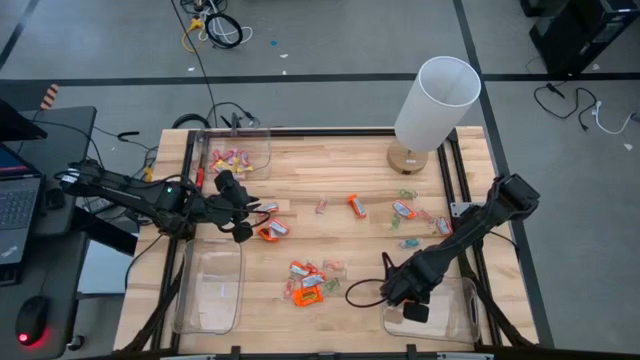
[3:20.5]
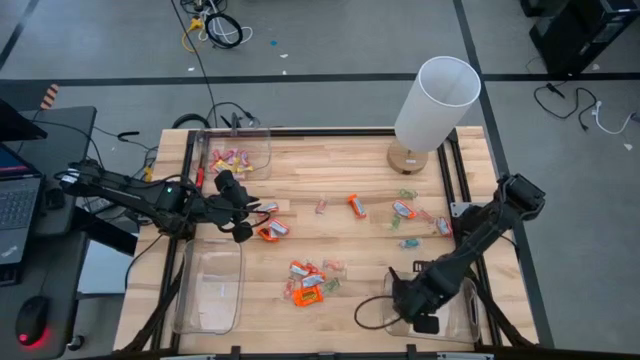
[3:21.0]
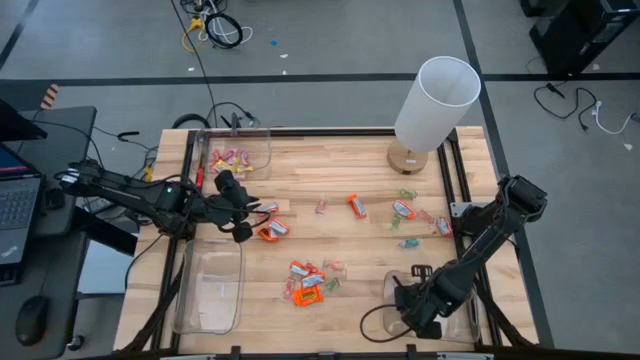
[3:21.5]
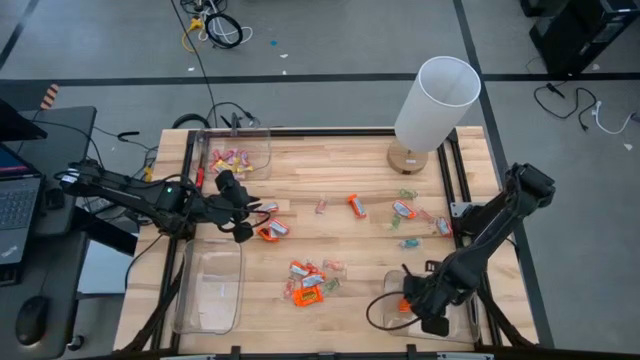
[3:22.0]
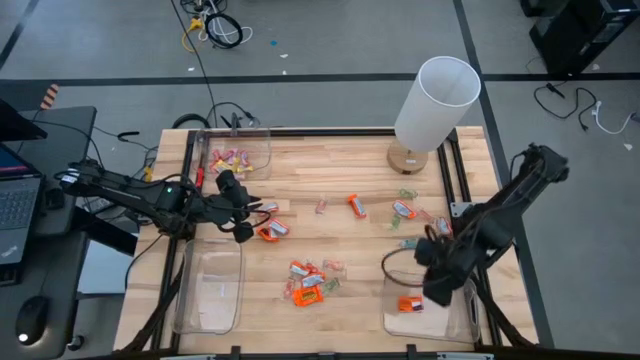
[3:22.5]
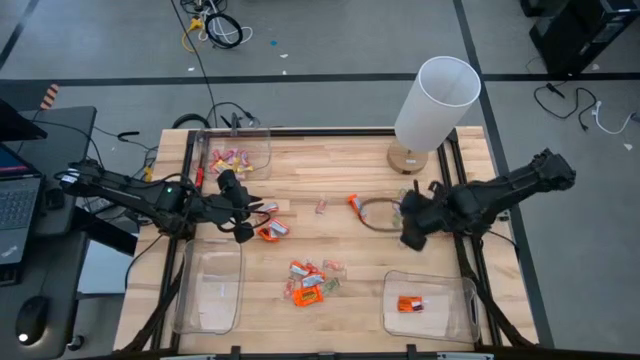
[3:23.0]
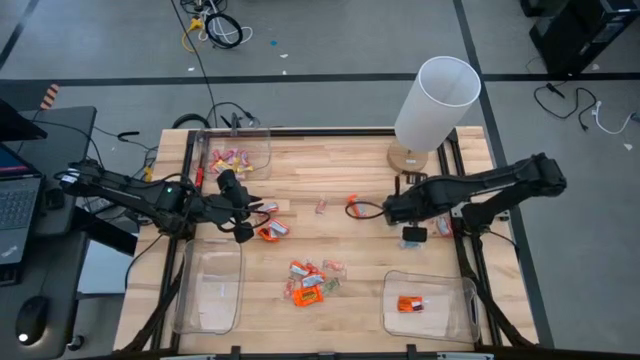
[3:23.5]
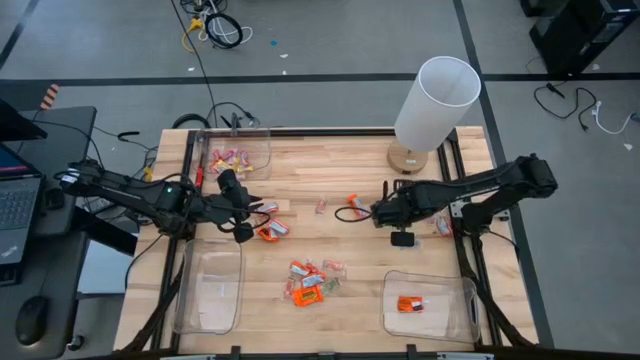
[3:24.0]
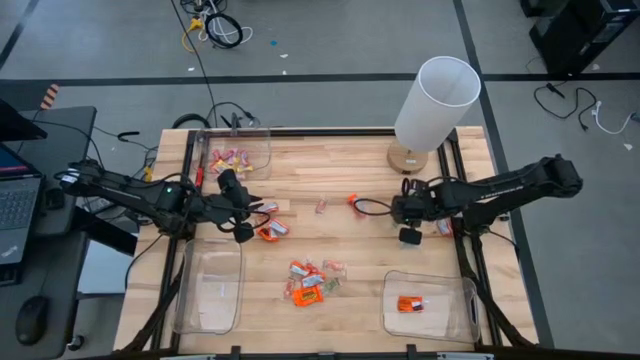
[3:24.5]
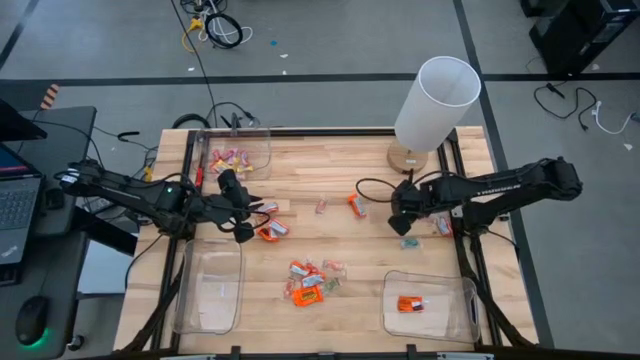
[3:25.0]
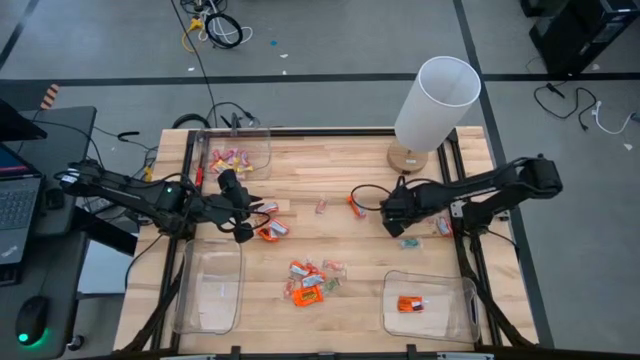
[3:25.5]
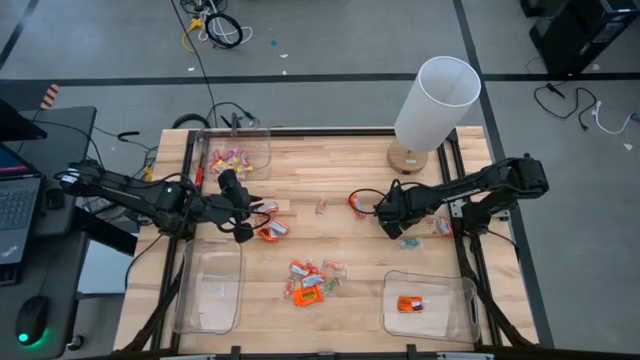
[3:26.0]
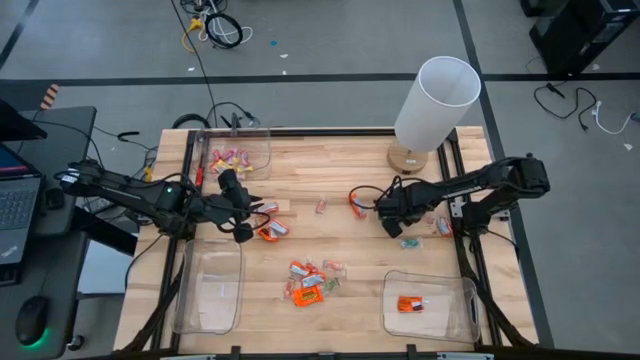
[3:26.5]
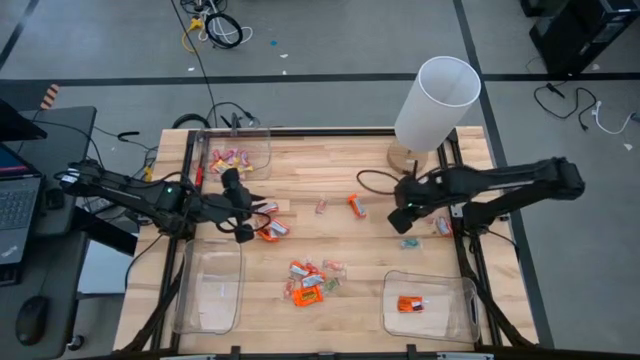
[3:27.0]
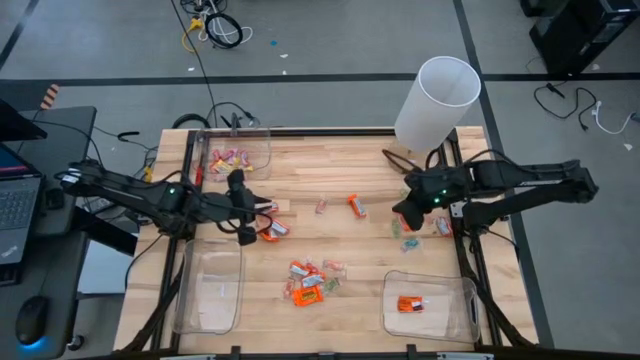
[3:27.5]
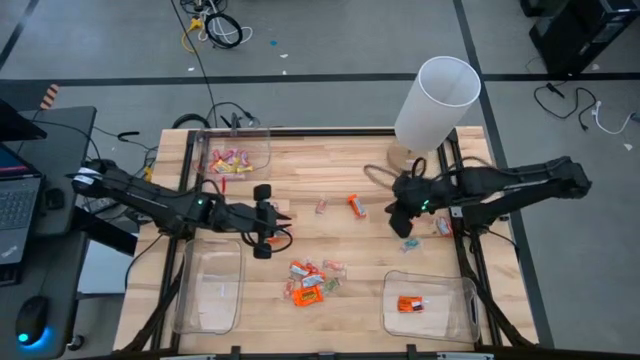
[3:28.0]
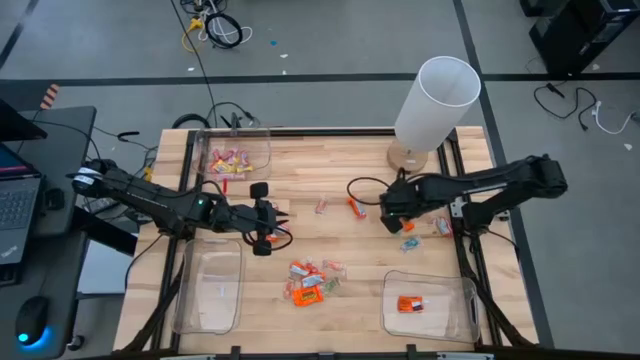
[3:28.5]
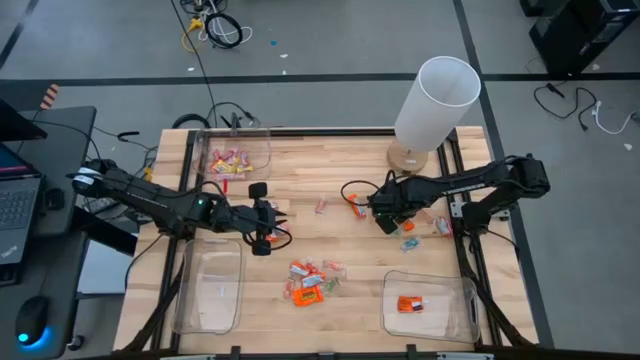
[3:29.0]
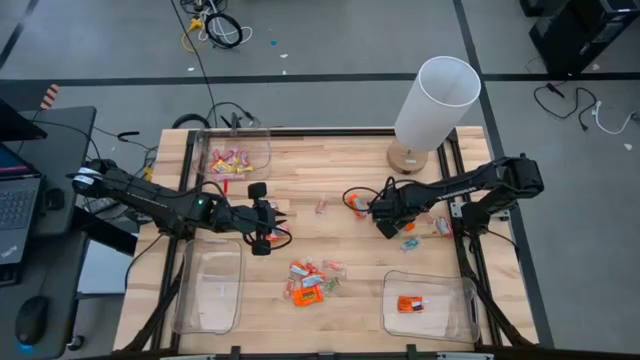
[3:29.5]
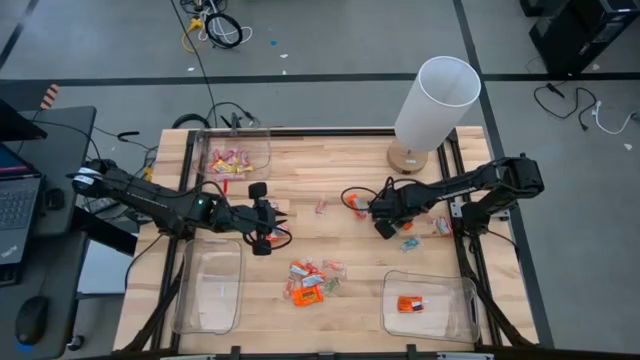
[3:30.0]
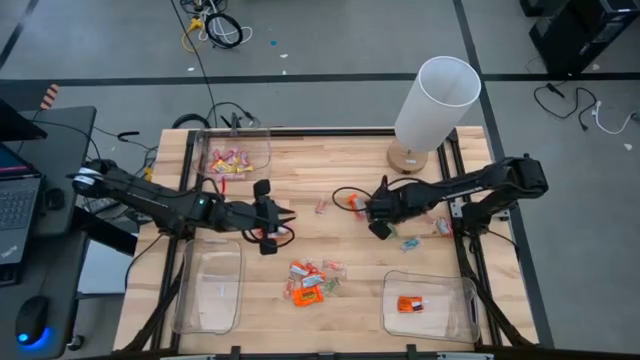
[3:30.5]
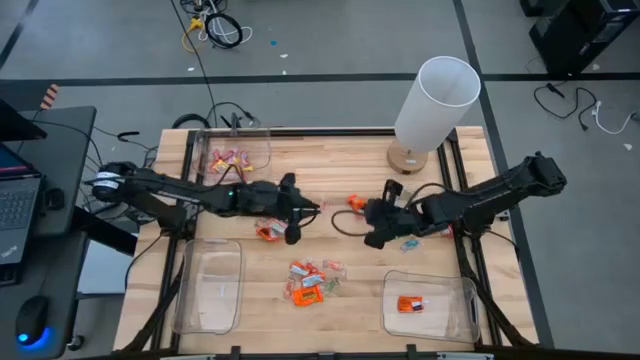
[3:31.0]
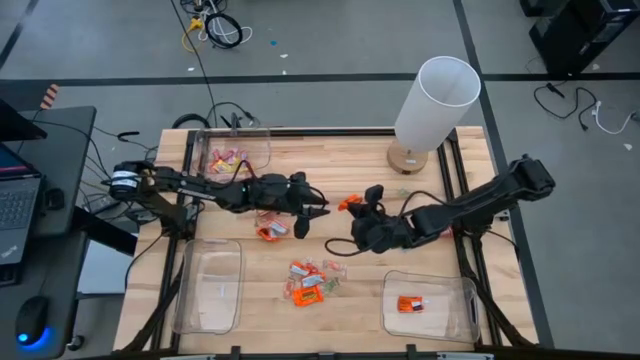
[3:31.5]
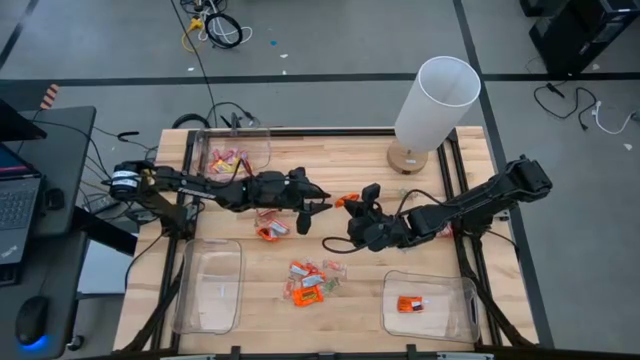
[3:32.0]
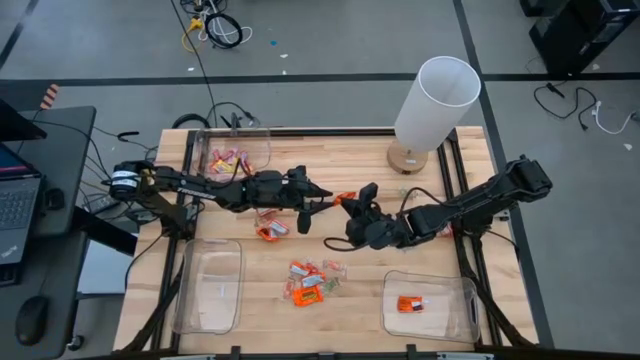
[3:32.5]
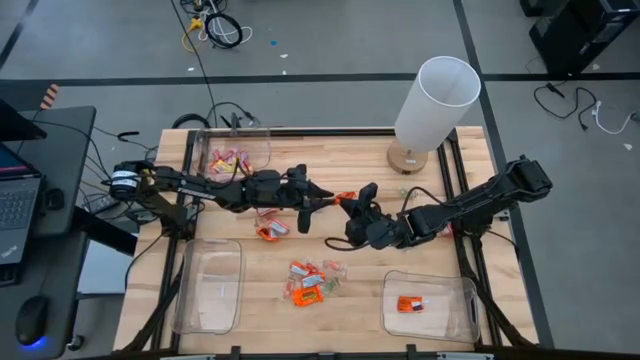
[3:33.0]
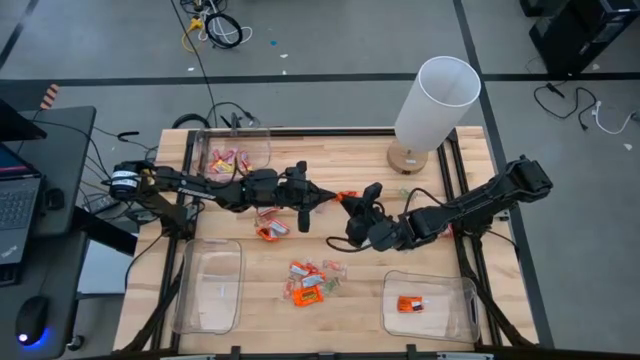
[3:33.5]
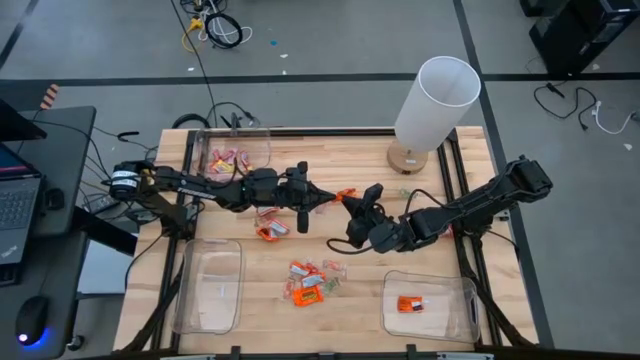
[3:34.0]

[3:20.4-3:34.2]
Task: Sort candy
Put the chocolate into the bottom right transparent bin

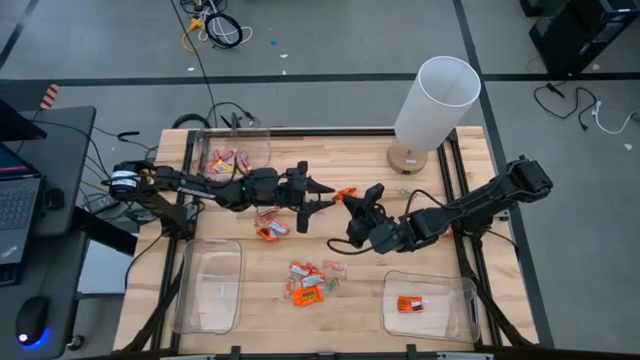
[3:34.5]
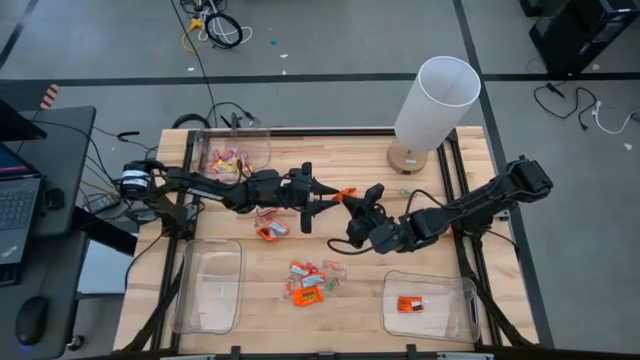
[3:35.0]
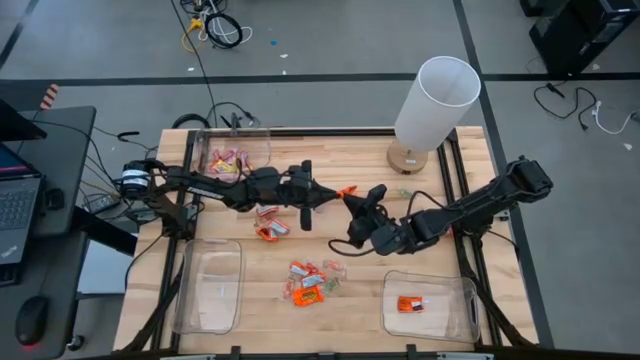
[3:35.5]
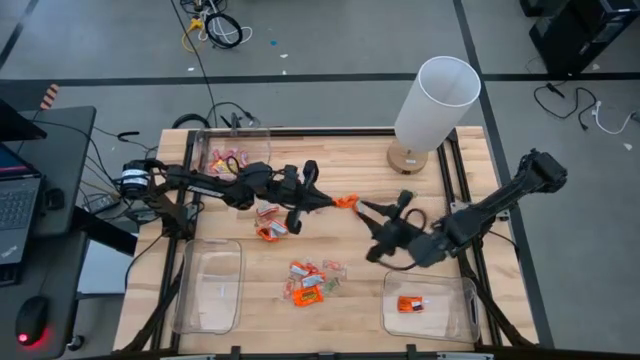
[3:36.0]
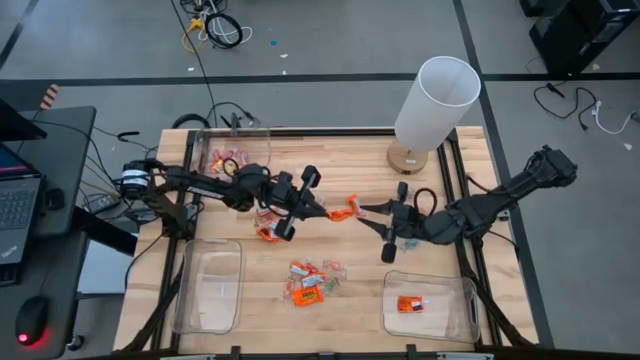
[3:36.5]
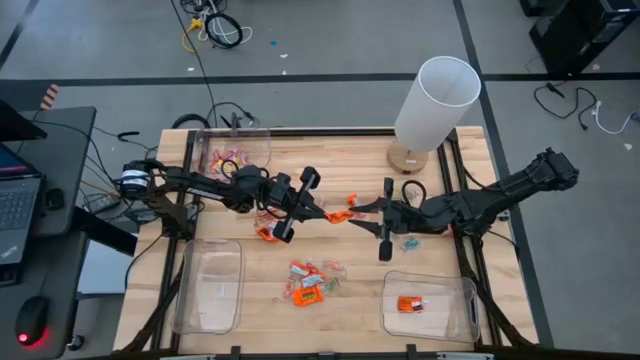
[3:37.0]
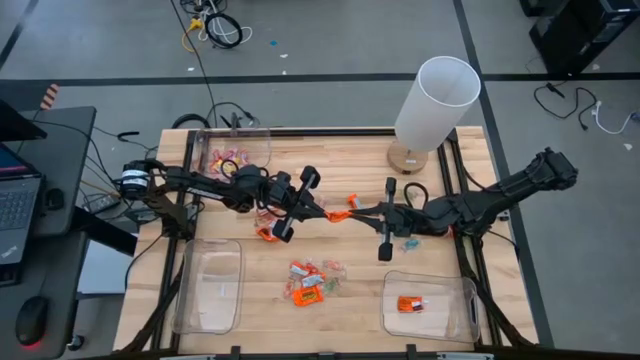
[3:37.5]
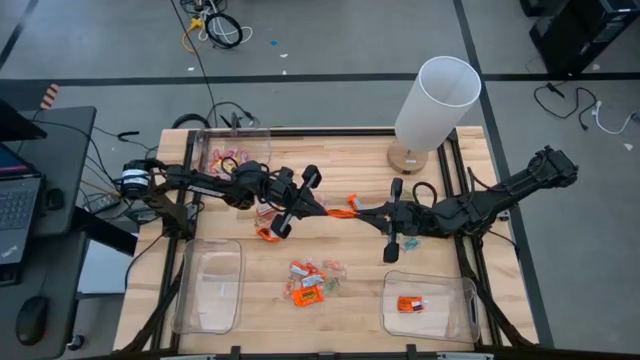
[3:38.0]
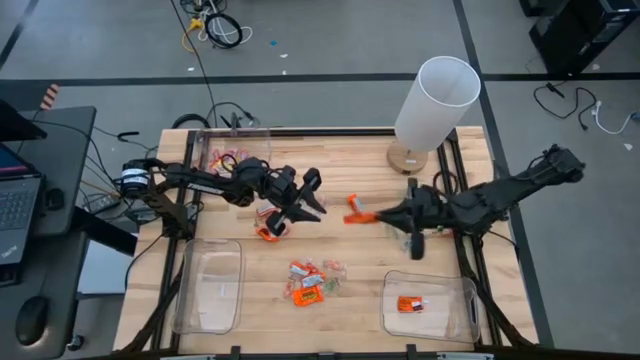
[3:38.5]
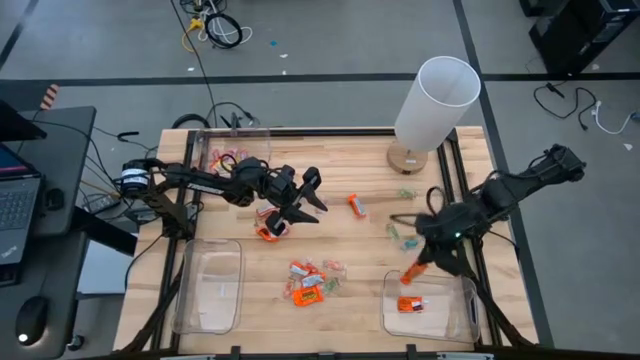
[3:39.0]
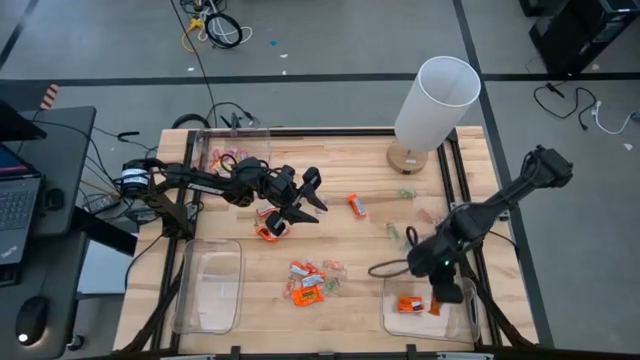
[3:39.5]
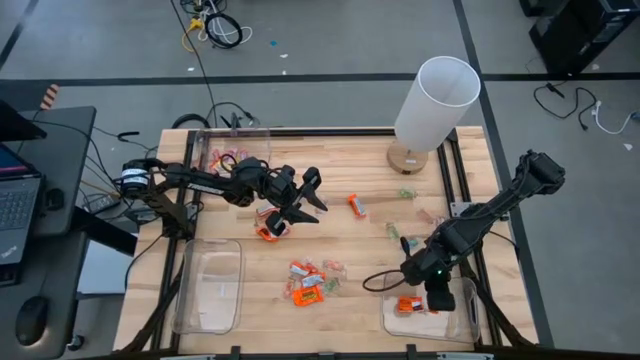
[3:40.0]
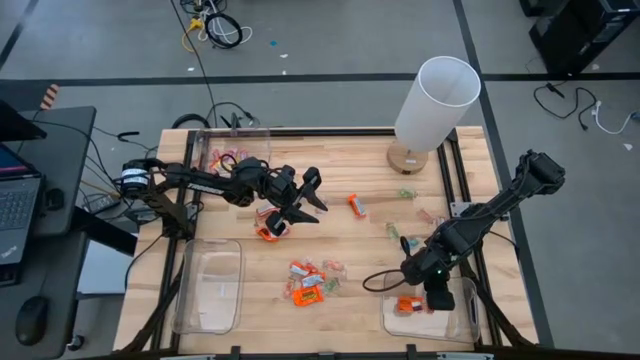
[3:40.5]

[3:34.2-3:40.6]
Put the chocolate into the bottom right transparent bin

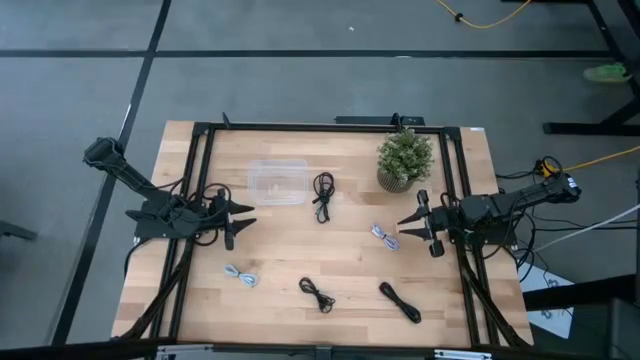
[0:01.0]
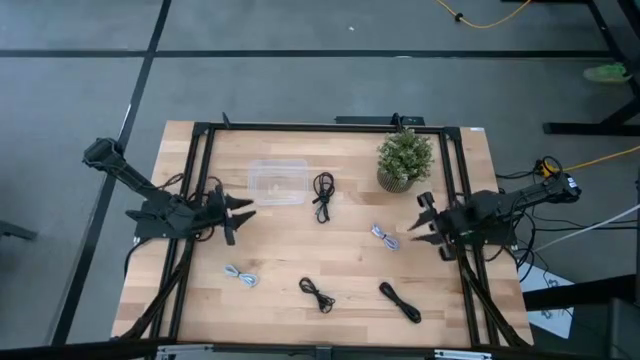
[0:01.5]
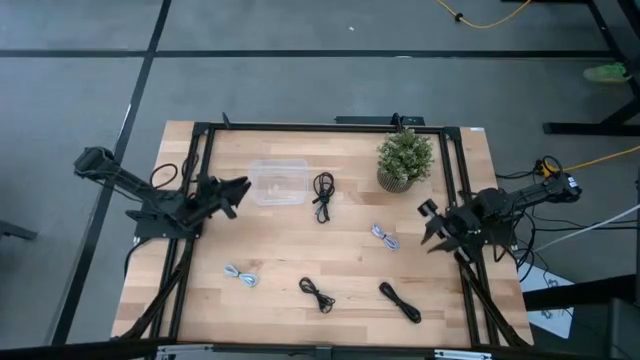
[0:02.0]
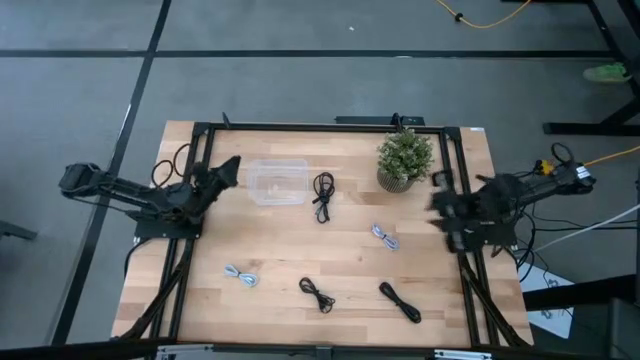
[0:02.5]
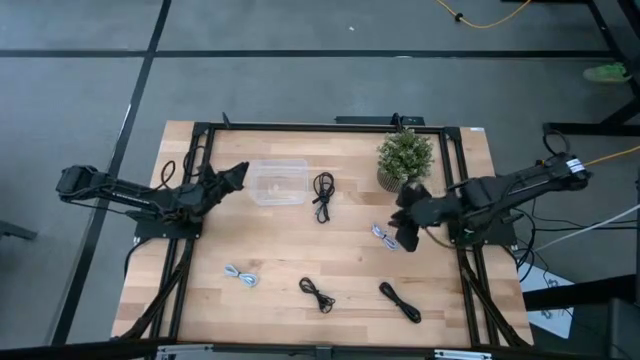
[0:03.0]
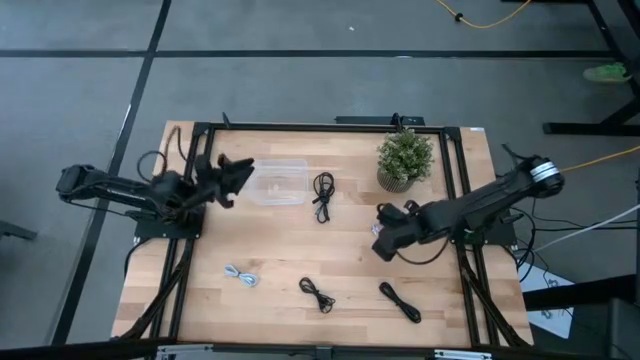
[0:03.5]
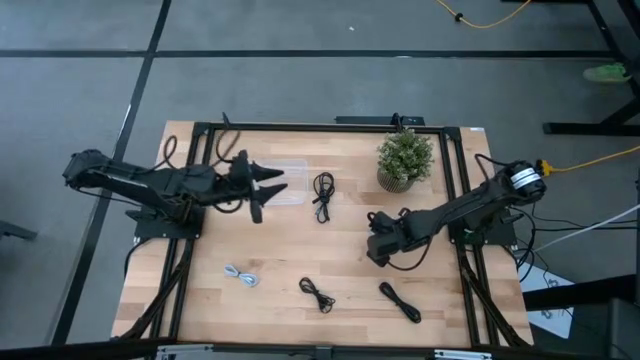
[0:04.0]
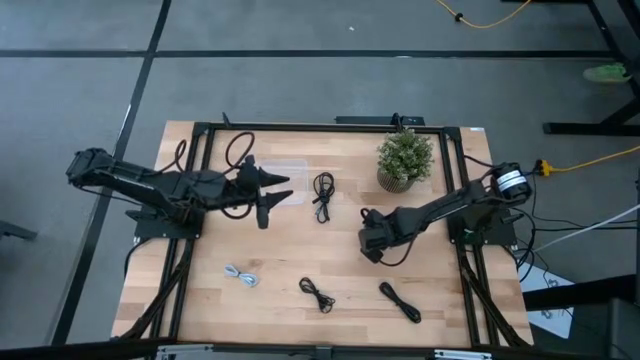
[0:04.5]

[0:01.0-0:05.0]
Task: Pick and place USB-C Cables
Put the purple USB cable into the transparent bin
